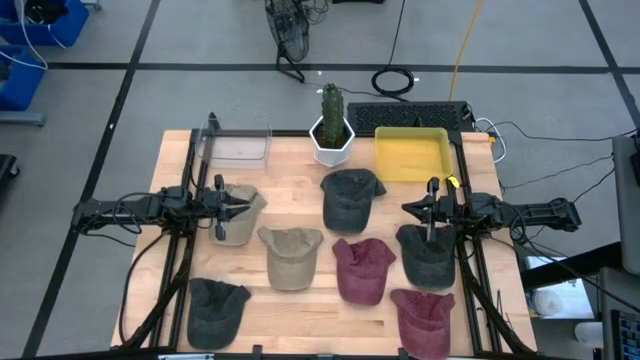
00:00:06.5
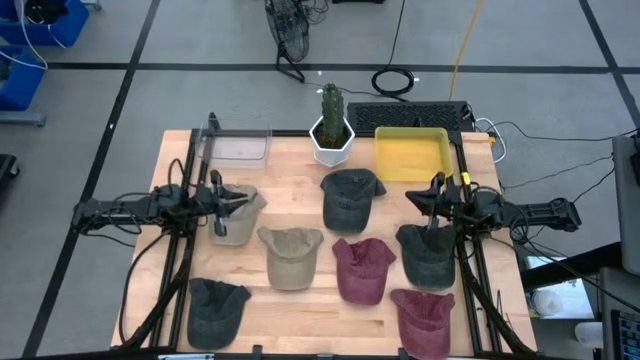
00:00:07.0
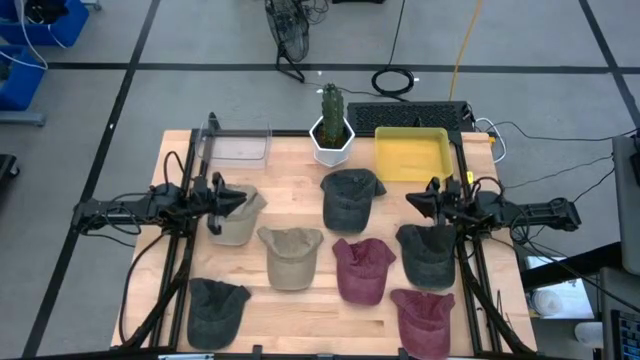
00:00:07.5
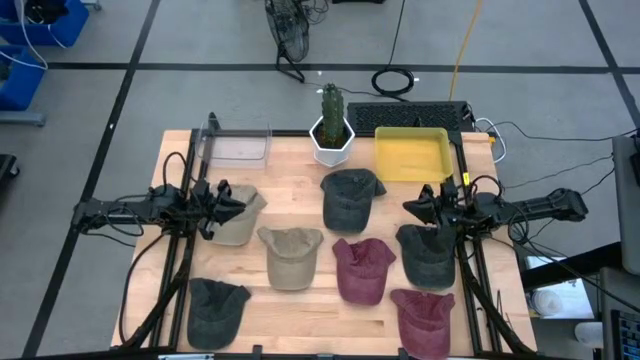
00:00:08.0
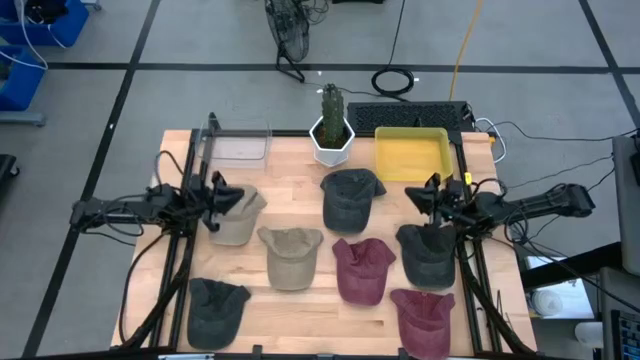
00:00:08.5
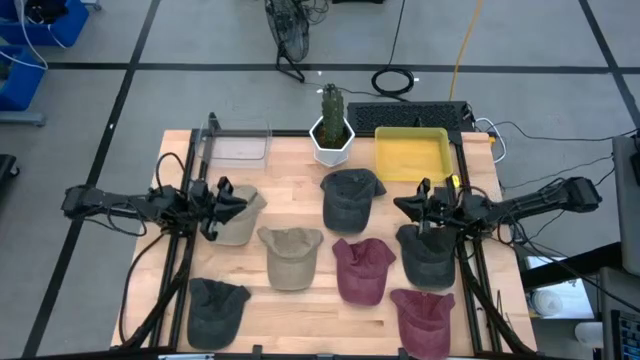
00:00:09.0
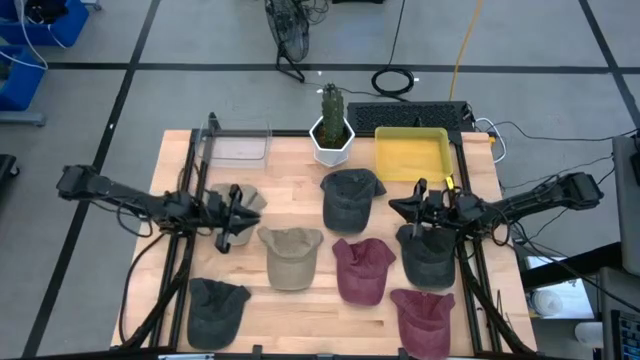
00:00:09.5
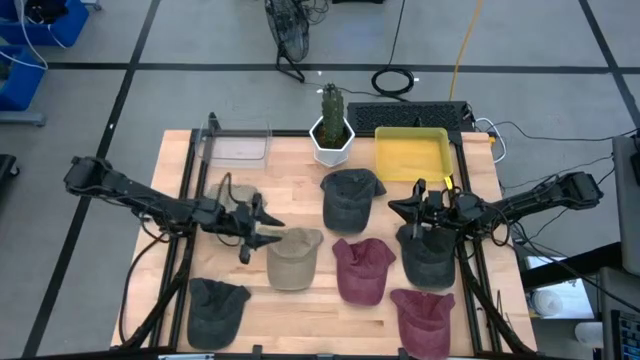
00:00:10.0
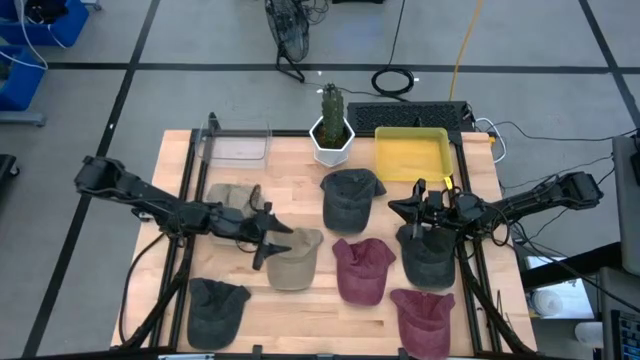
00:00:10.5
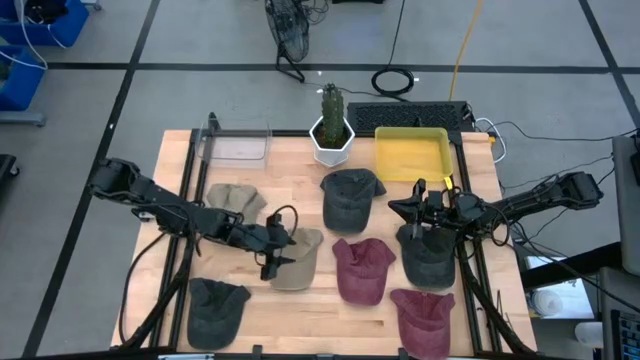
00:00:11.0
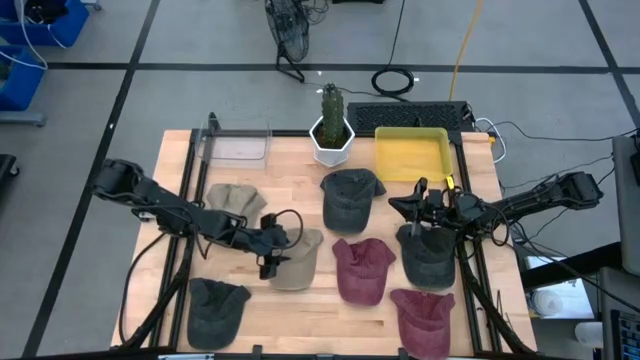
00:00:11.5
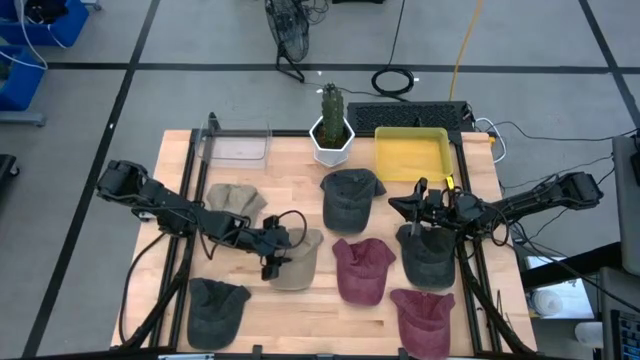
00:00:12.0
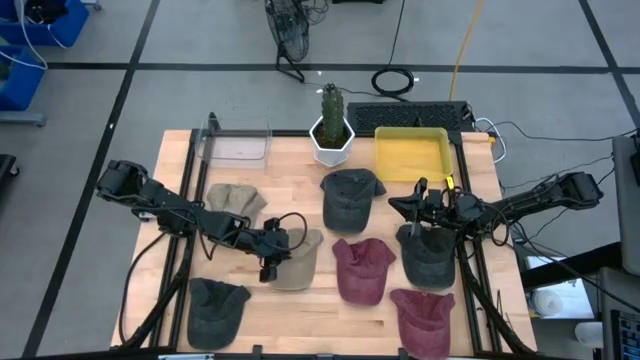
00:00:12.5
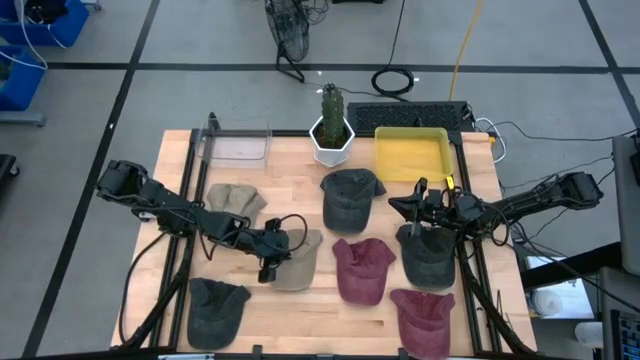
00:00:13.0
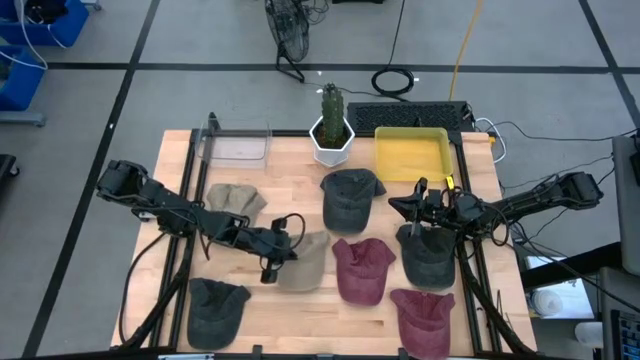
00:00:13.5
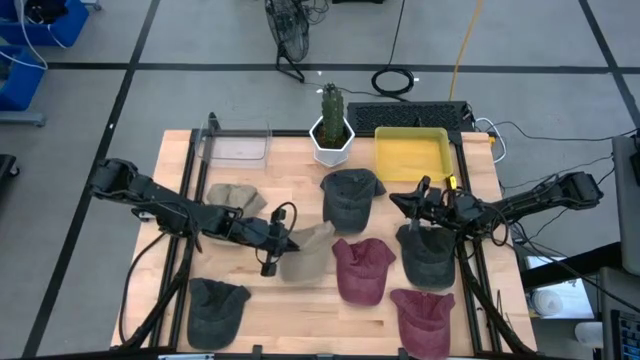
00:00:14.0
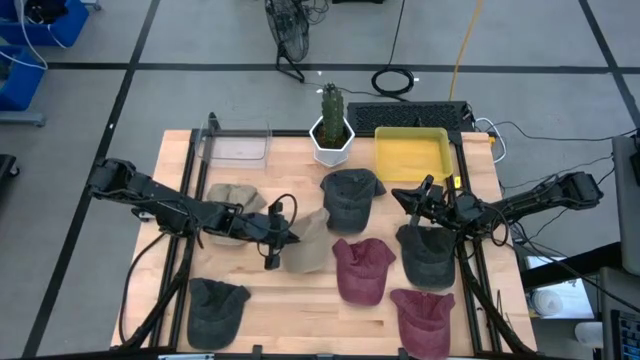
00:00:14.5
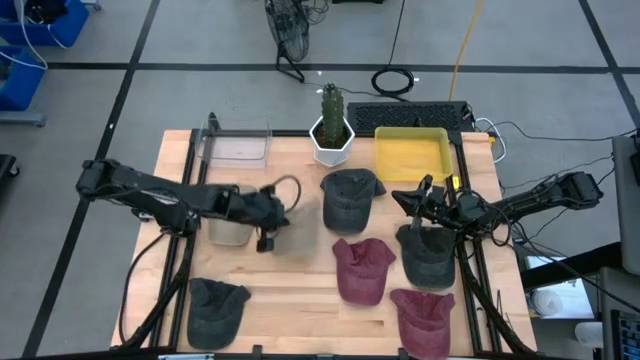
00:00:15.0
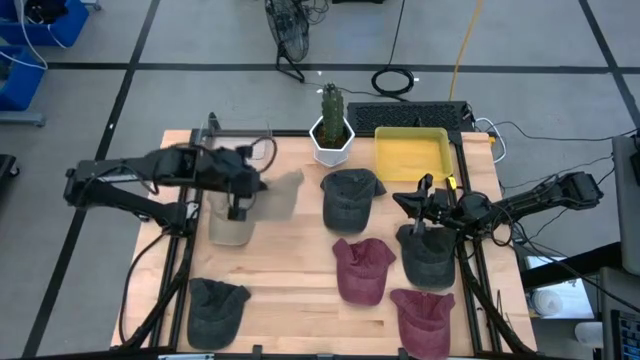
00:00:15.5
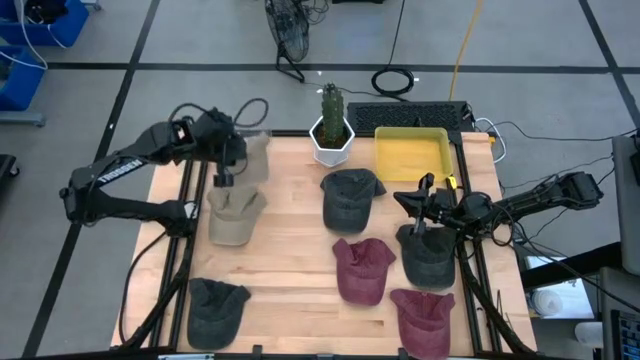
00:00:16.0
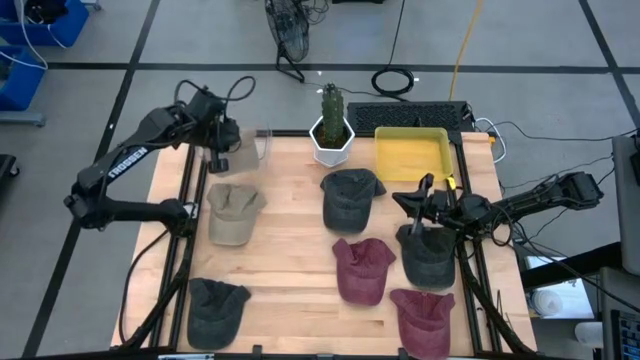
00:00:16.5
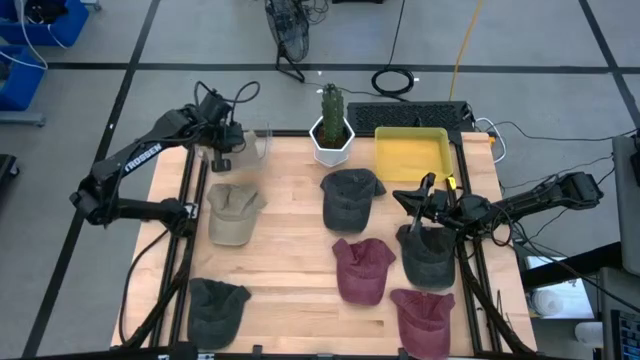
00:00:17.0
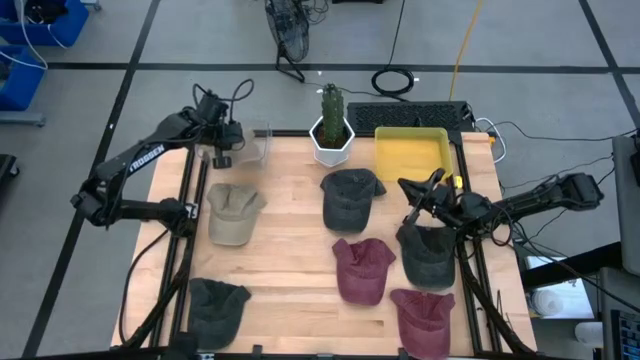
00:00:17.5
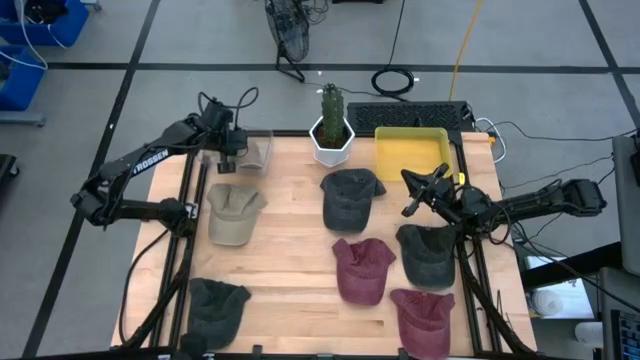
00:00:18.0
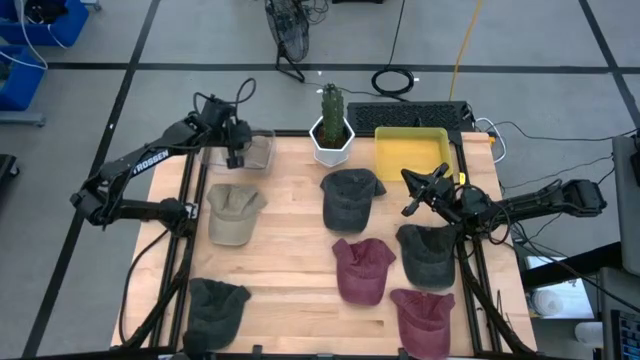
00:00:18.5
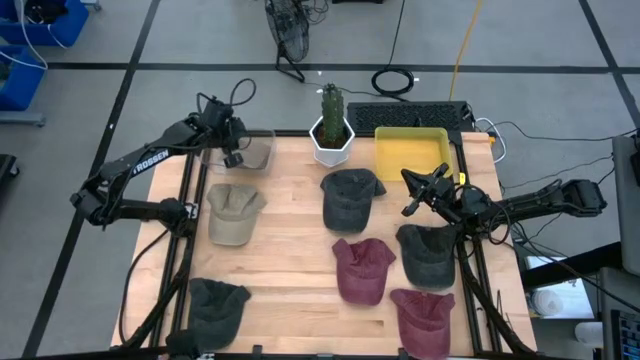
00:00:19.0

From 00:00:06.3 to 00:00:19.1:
Task: Pick & Place hat
Put the right brown cap into the transparent bin

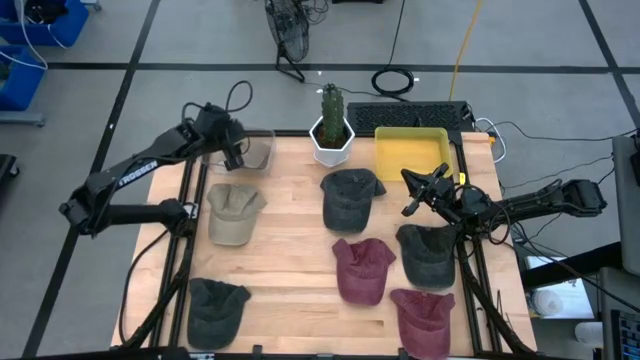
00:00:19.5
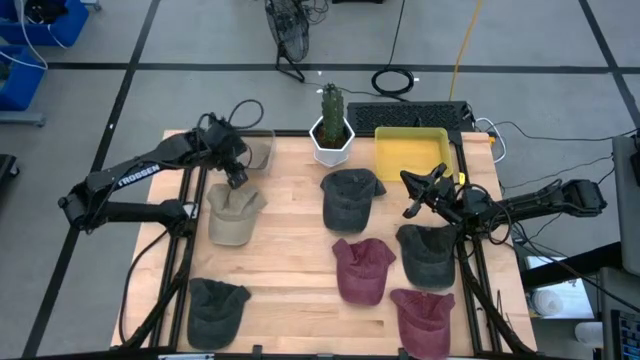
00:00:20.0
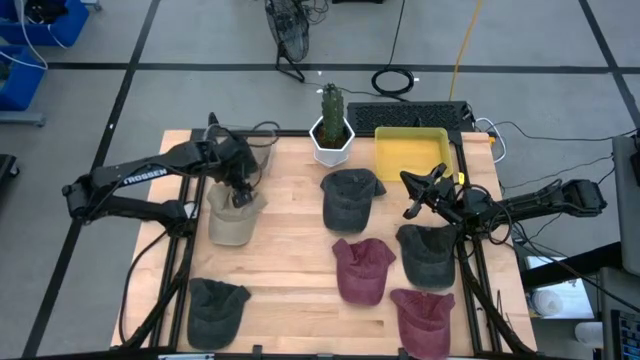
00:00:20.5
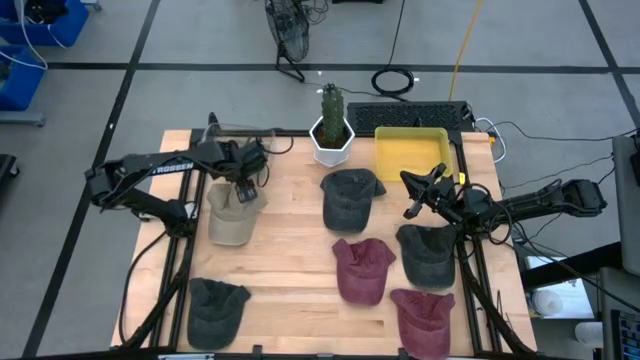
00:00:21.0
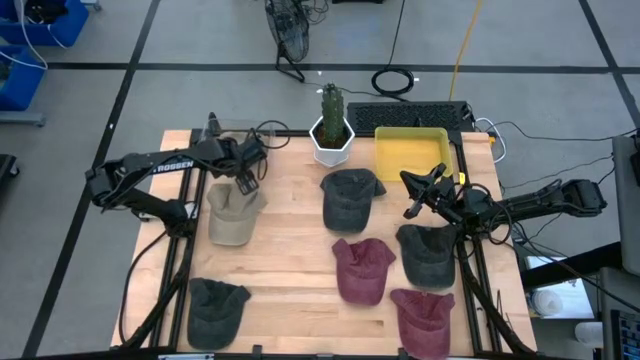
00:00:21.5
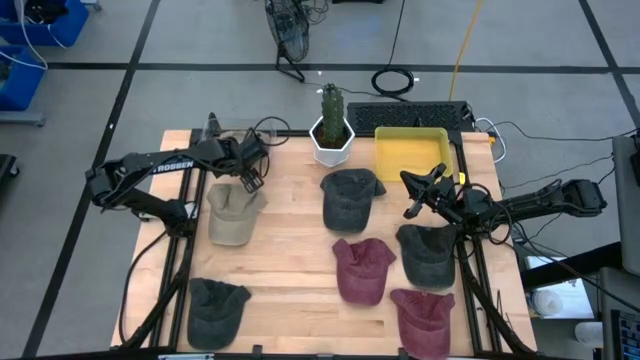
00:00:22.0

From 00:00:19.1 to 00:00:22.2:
Adjust the transparent bin on the table

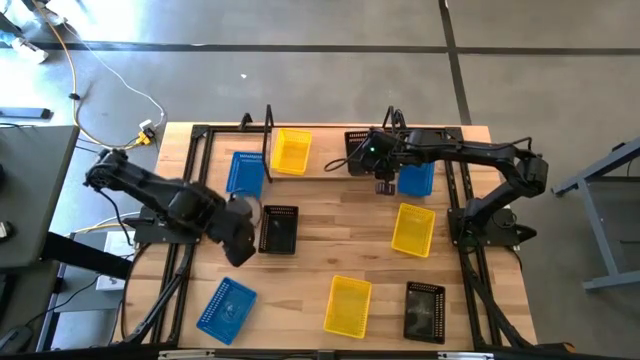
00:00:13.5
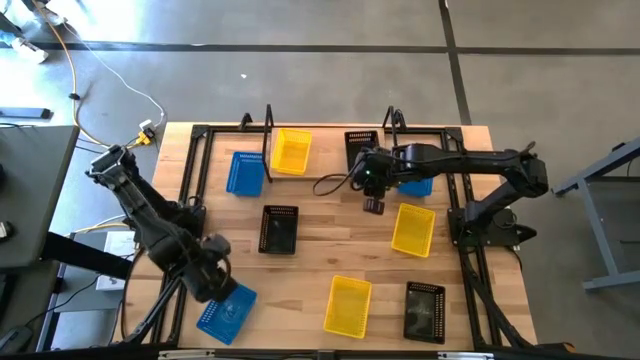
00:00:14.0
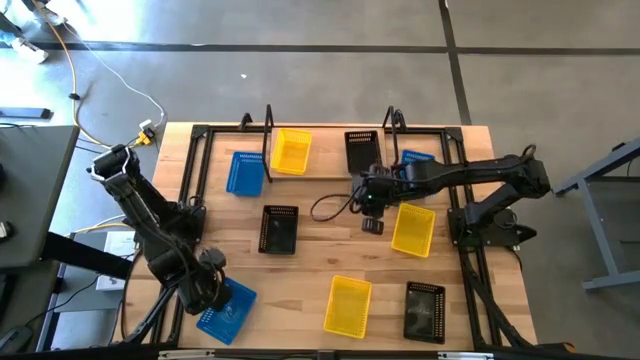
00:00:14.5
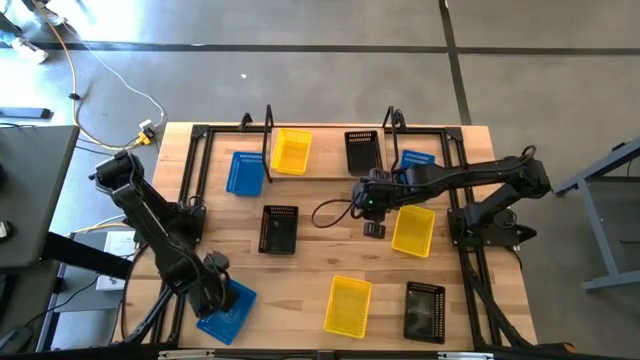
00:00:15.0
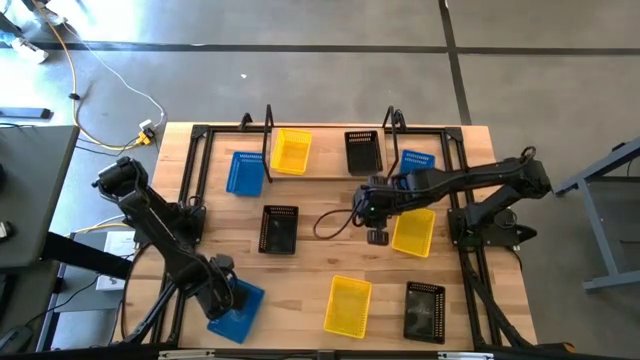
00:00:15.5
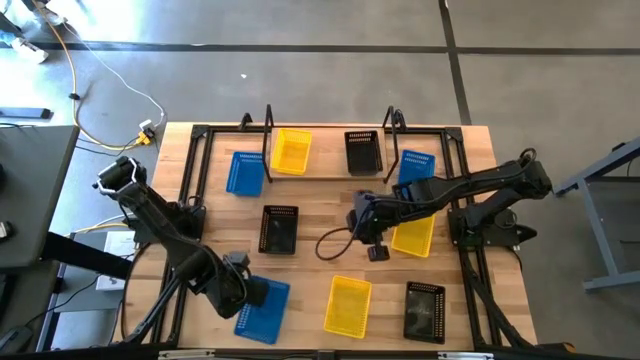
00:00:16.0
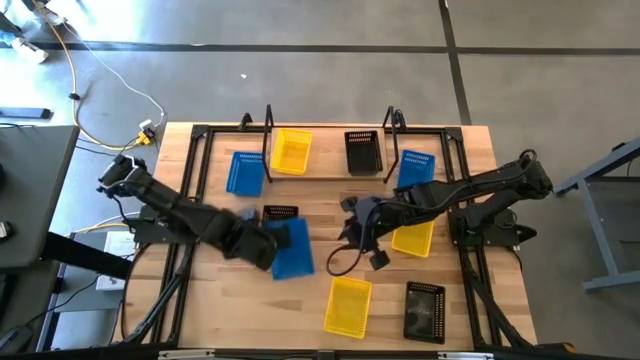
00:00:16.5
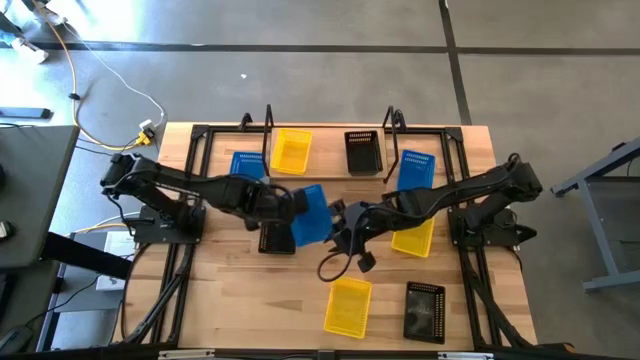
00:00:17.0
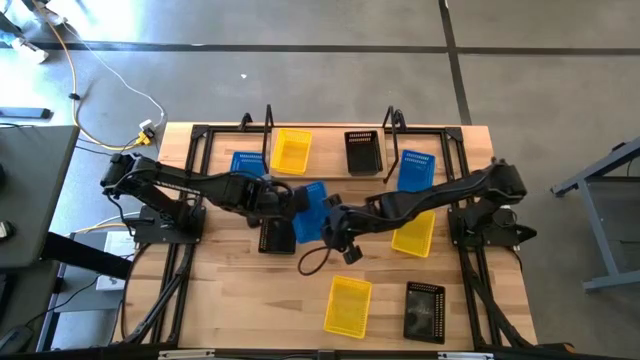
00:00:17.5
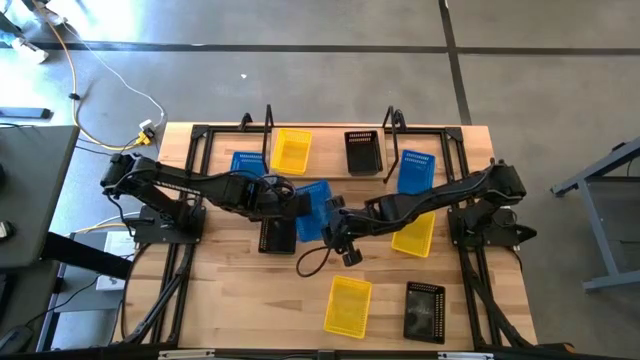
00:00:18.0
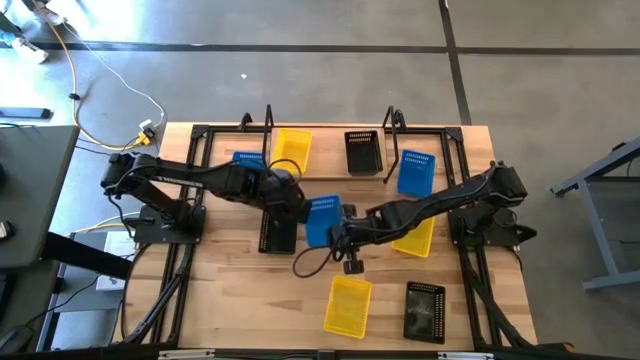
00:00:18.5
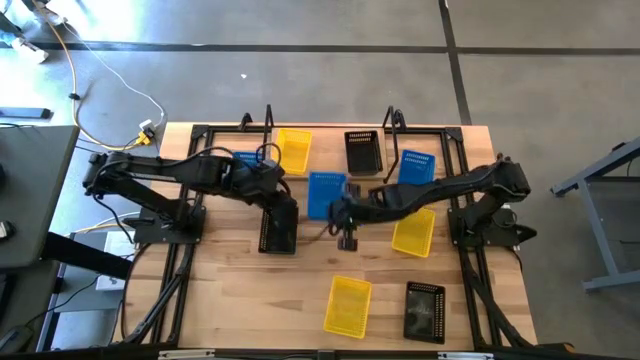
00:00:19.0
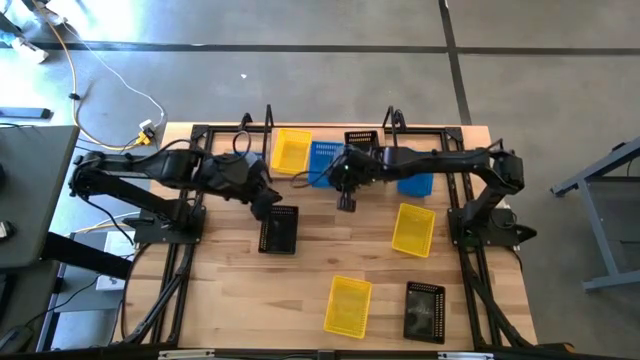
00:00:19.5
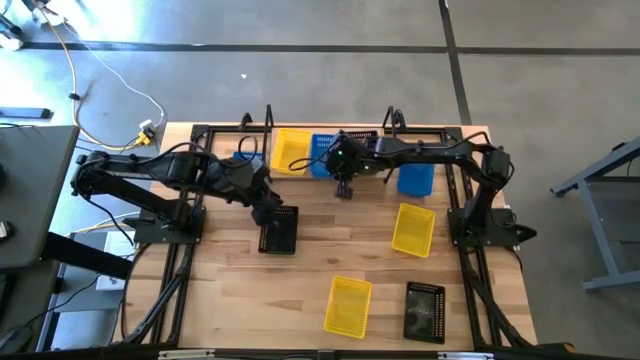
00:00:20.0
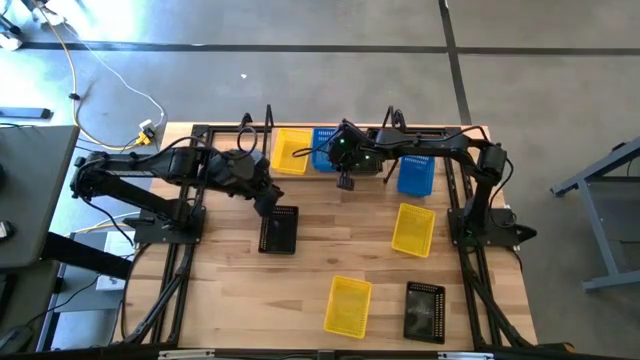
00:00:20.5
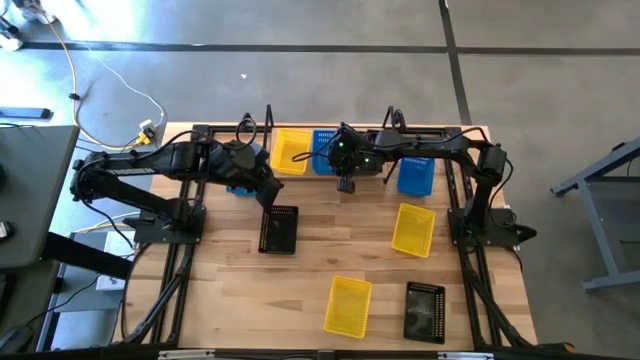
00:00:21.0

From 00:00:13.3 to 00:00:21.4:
Task: Stack baskets on shelf by color
Put the bottom blue basket on the shelf
